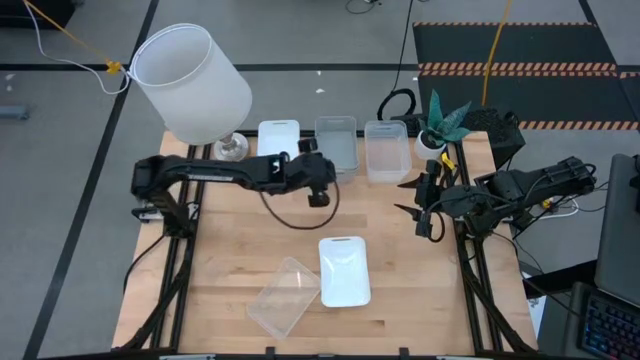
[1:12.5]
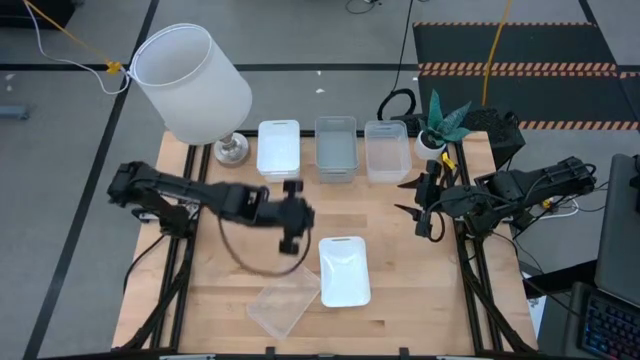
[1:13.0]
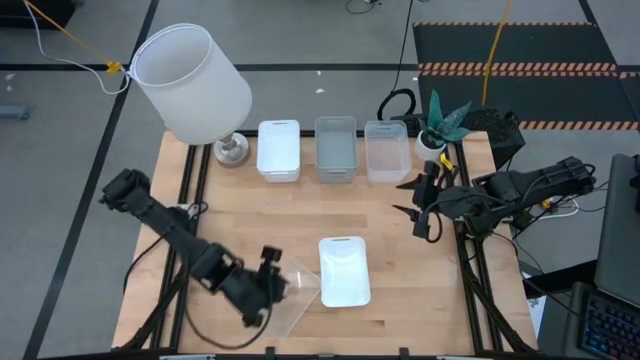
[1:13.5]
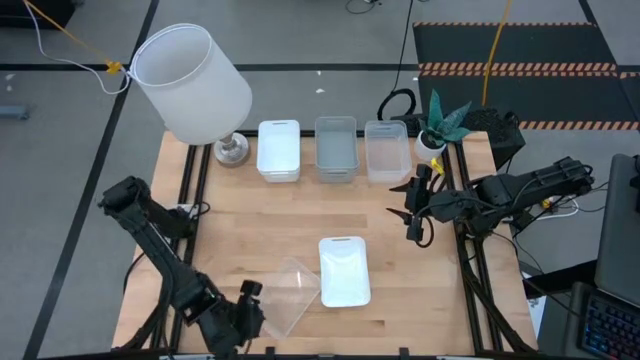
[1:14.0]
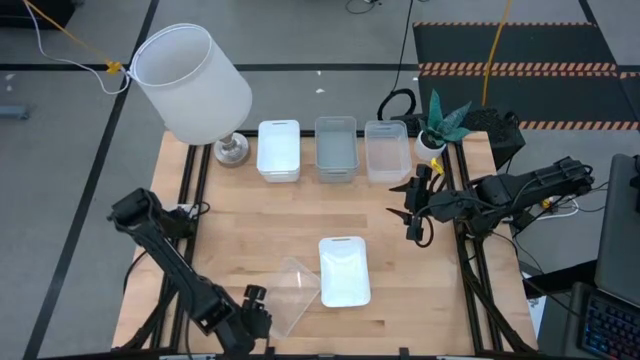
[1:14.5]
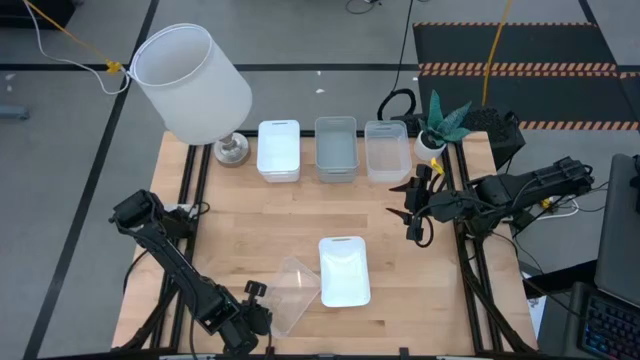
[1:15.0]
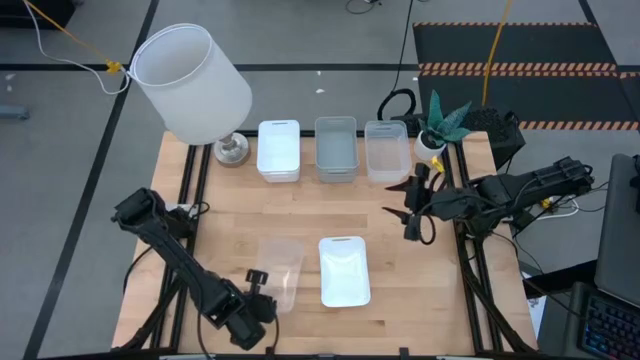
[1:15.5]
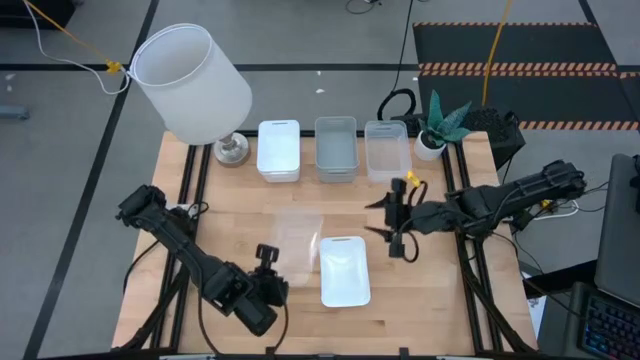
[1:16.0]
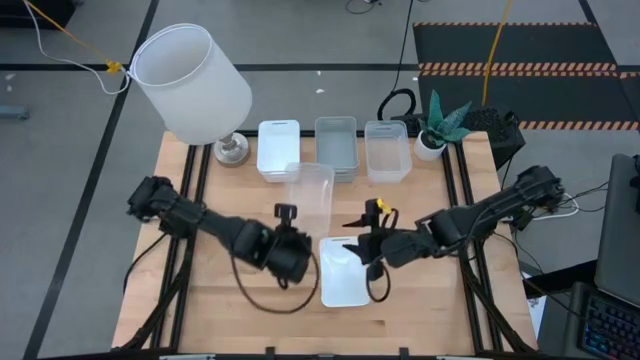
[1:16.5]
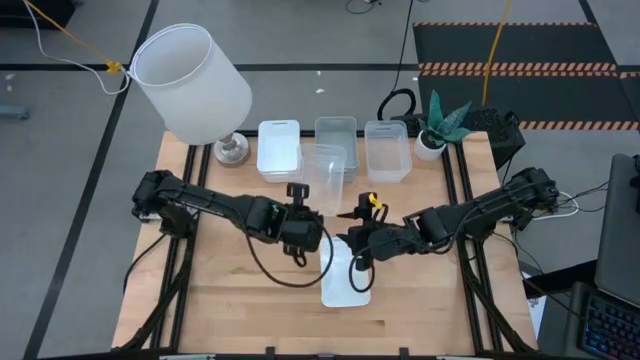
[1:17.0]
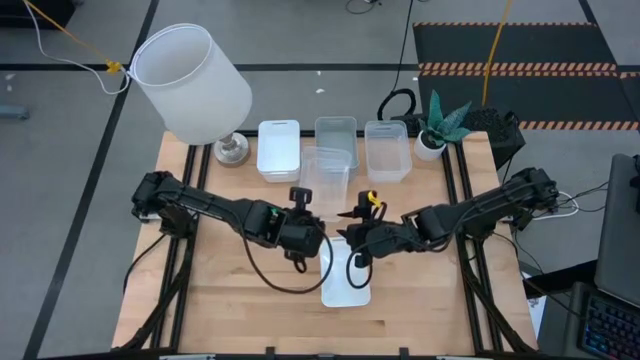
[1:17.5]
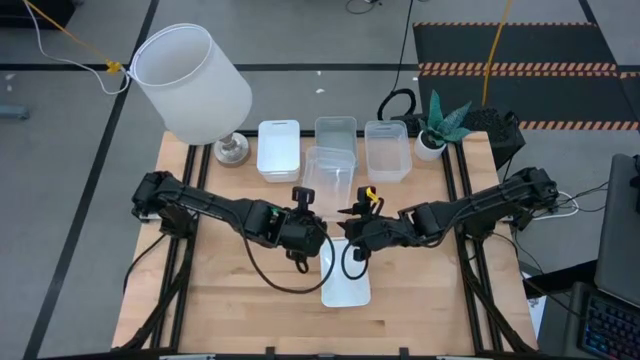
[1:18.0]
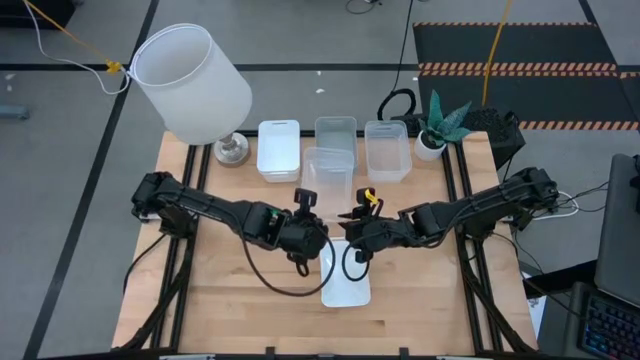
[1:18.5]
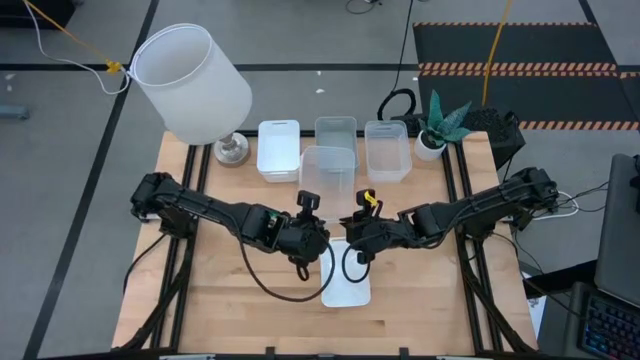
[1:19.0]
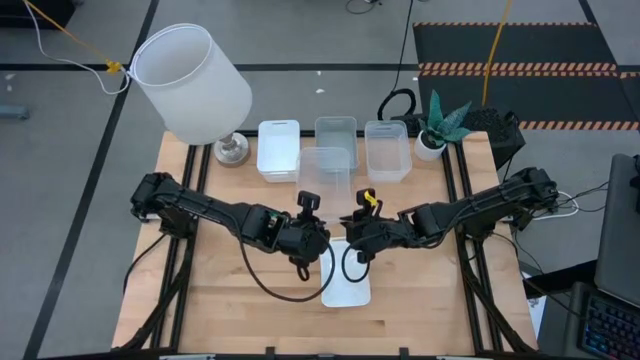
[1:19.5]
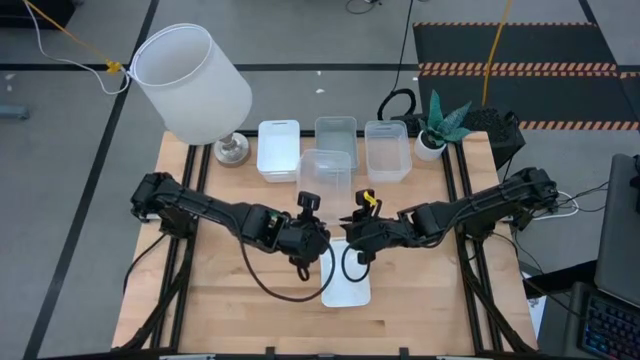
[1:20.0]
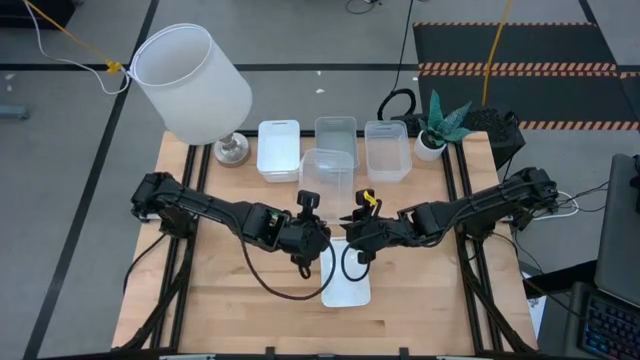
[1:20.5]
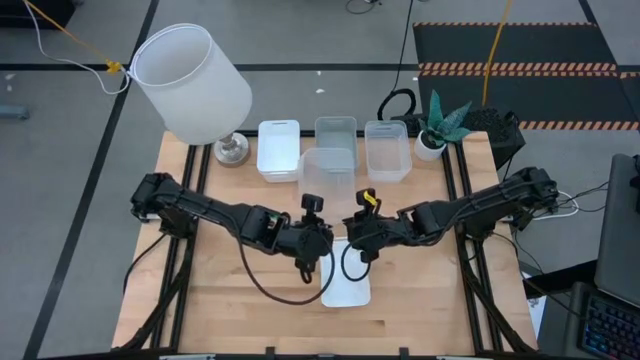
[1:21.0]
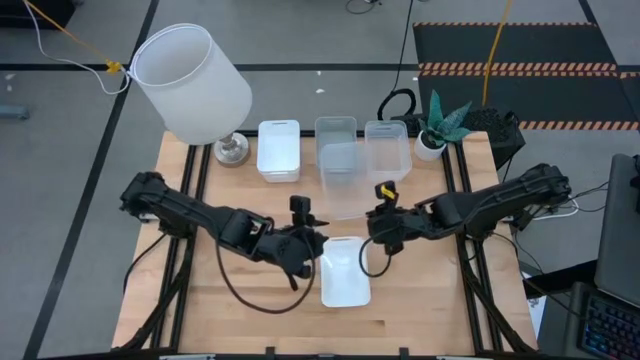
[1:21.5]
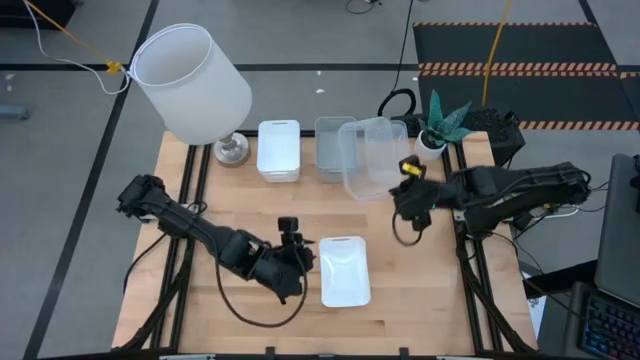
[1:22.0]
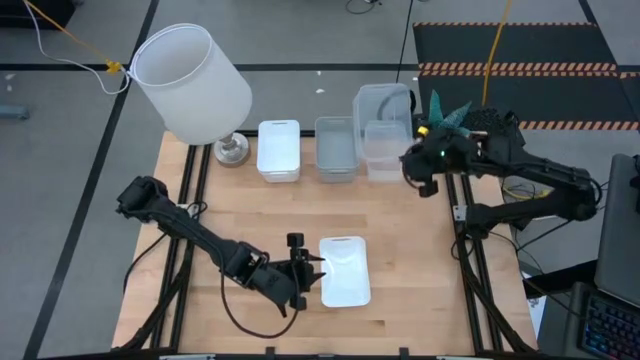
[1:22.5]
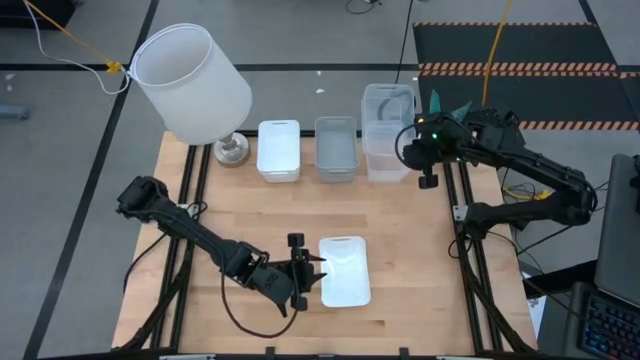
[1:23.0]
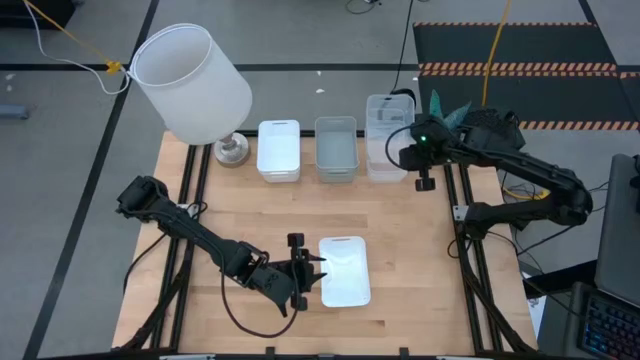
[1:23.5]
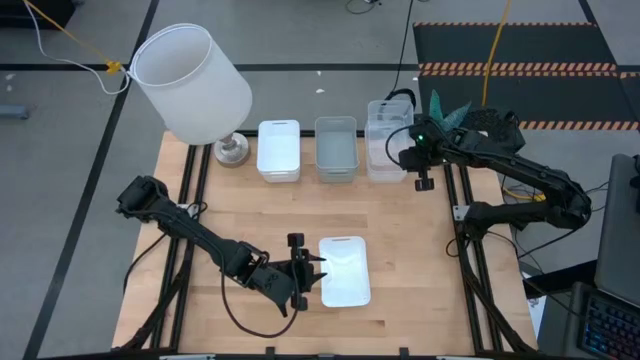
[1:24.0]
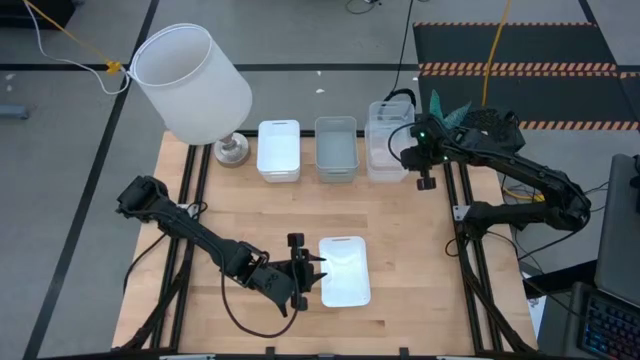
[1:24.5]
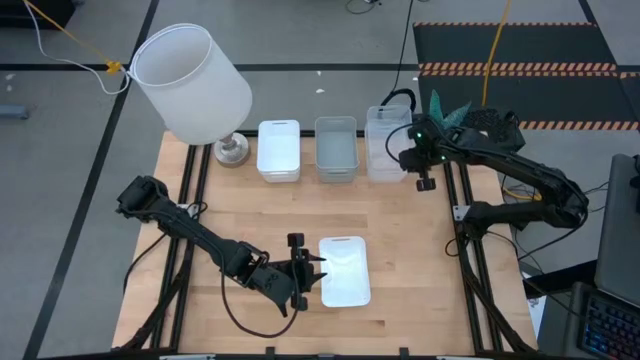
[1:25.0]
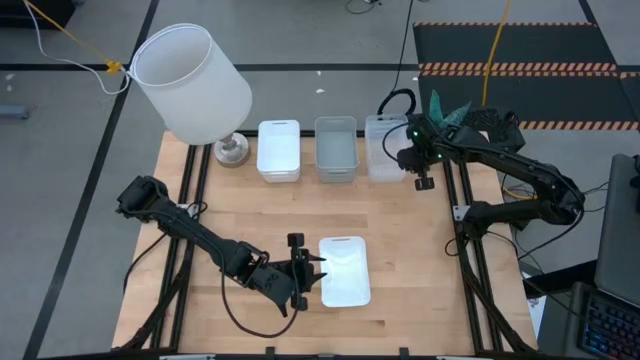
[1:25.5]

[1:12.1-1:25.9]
Stack the transparent bin on the top right stacked transparent bins

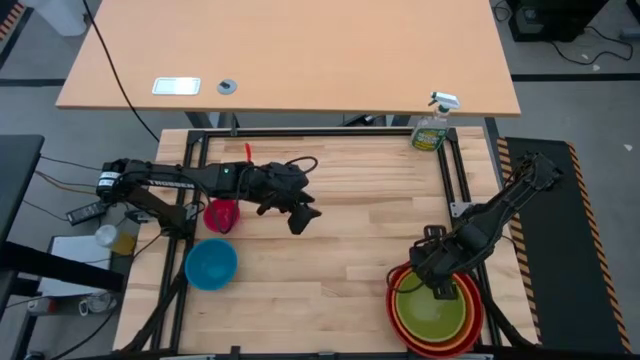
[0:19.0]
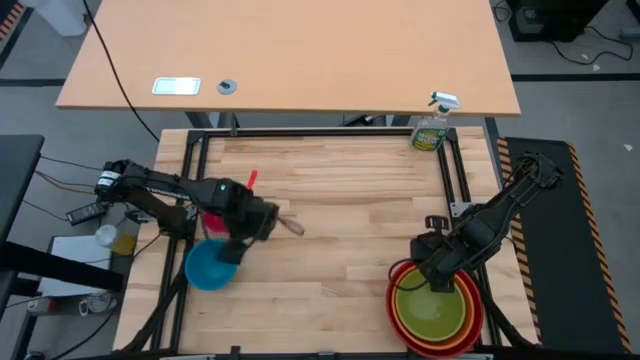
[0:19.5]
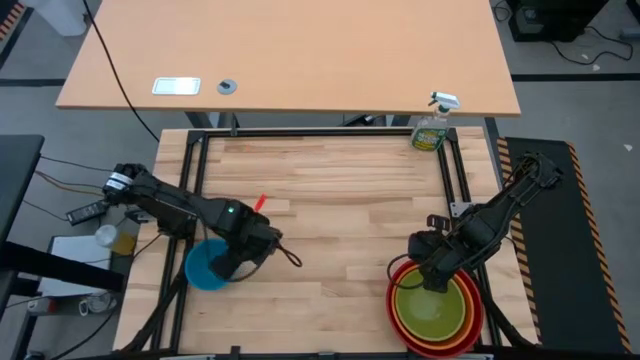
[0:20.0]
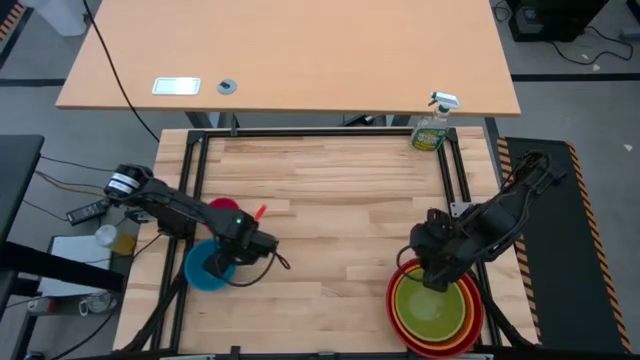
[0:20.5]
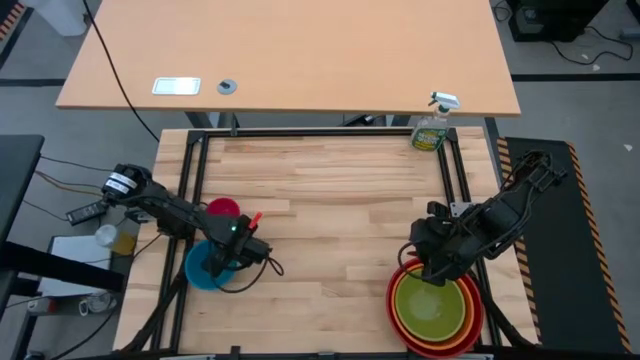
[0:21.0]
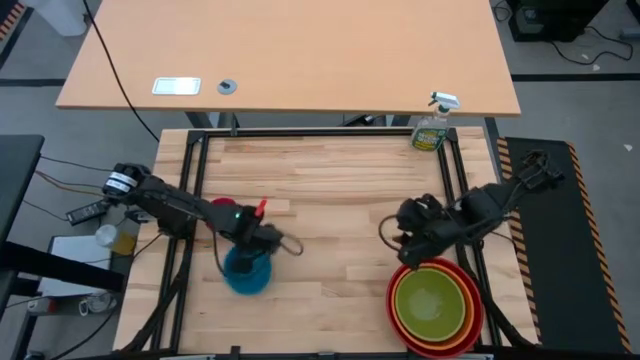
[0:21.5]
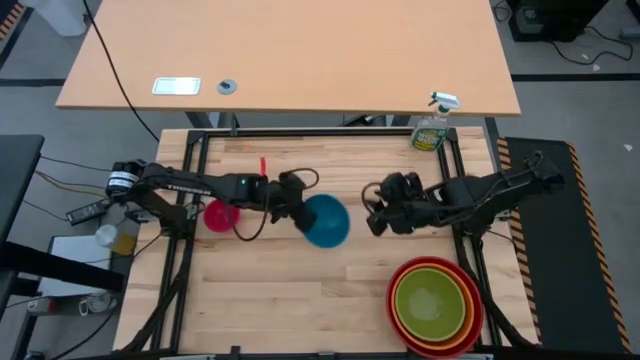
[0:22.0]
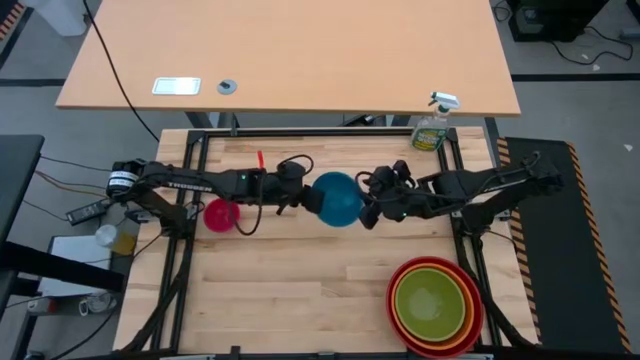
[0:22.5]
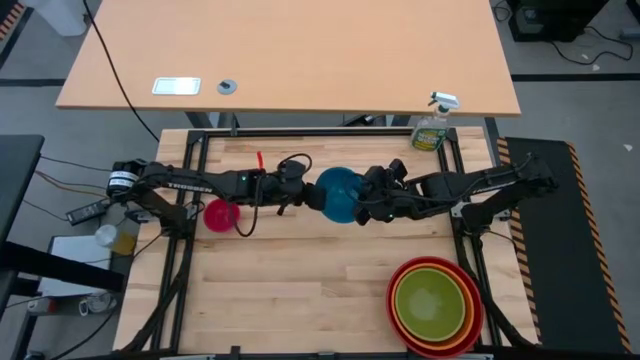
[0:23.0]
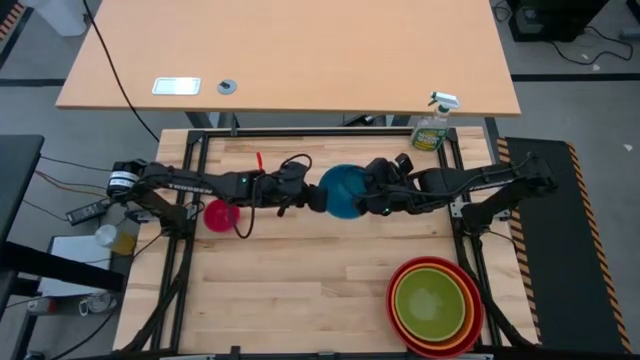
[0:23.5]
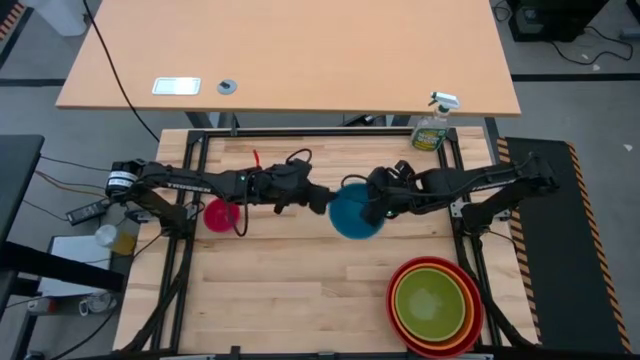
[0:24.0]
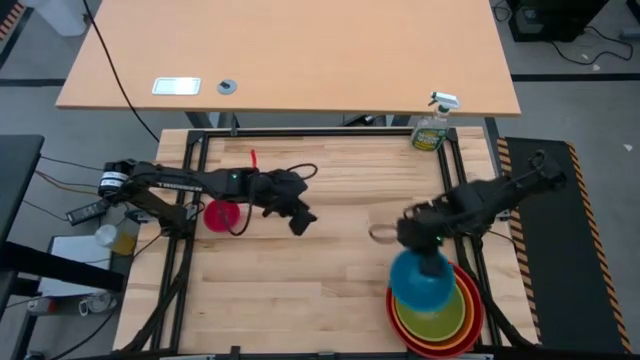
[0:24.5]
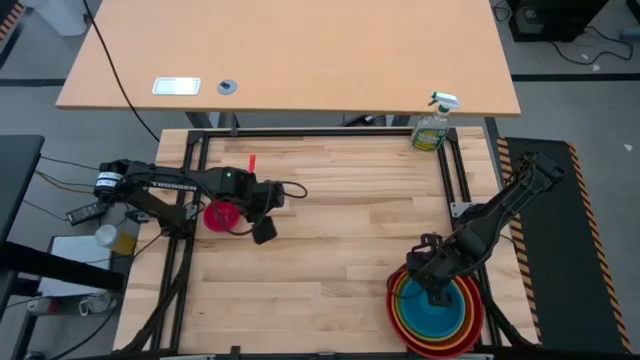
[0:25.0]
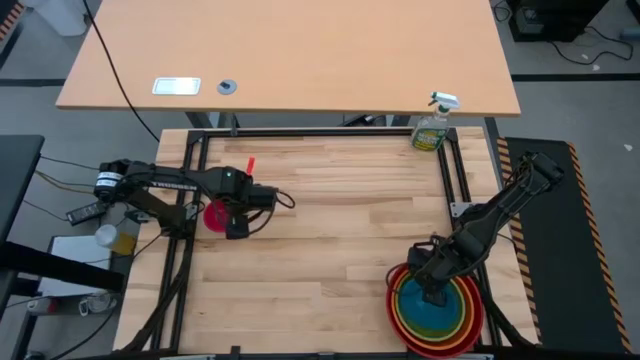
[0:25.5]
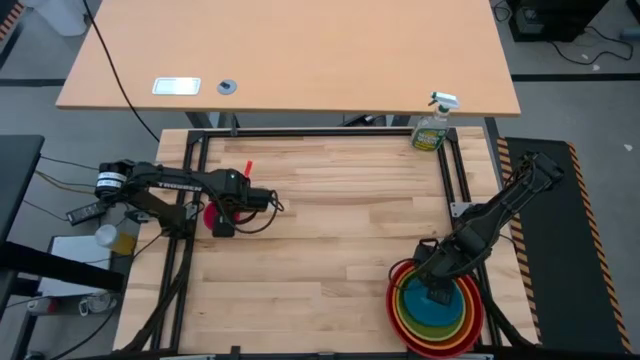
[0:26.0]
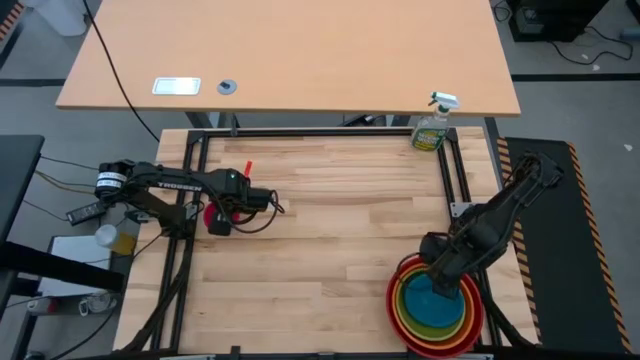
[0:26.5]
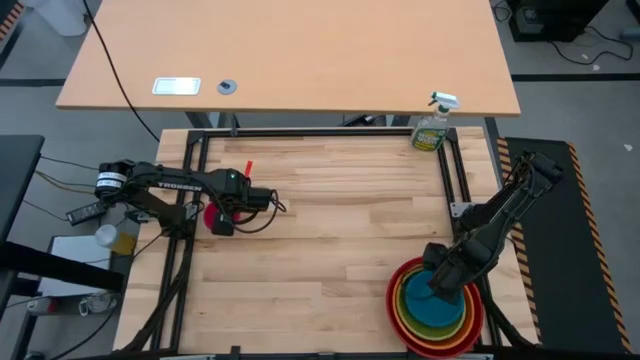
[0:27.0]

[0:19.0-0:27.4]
Stack the small blue bowl on top of the medium green bowl
